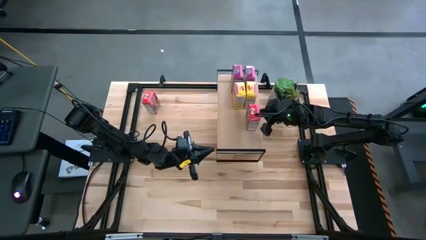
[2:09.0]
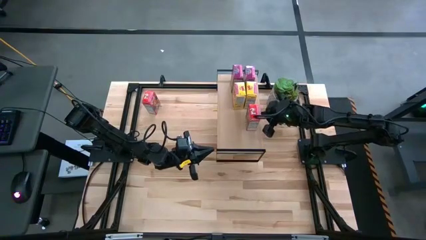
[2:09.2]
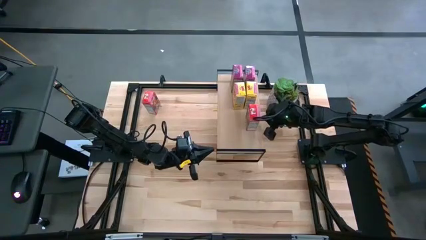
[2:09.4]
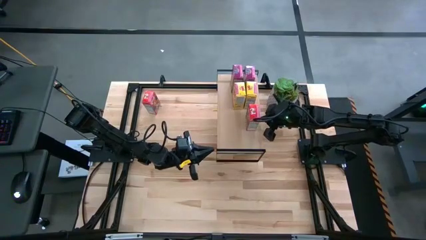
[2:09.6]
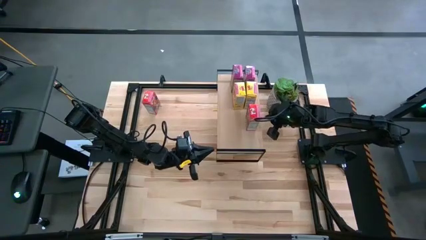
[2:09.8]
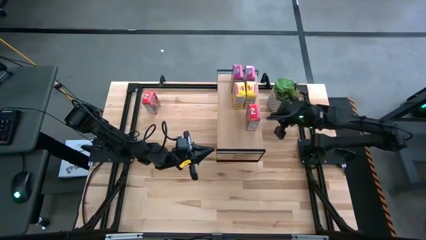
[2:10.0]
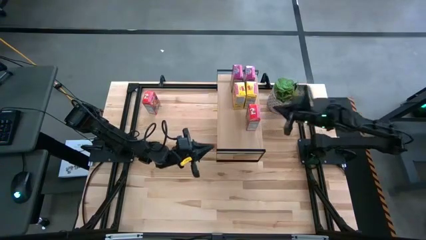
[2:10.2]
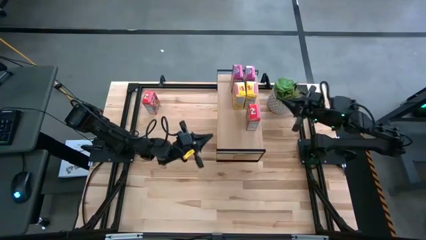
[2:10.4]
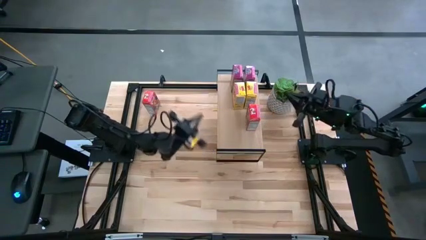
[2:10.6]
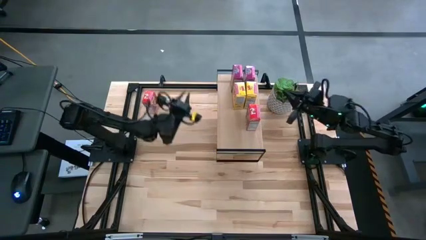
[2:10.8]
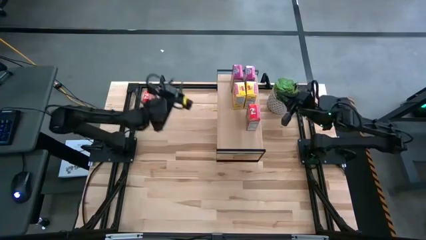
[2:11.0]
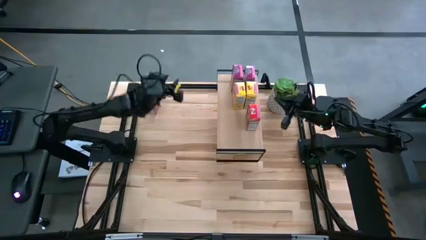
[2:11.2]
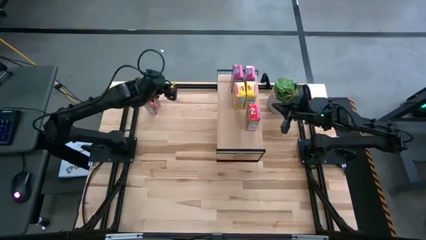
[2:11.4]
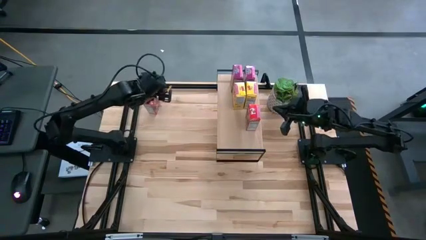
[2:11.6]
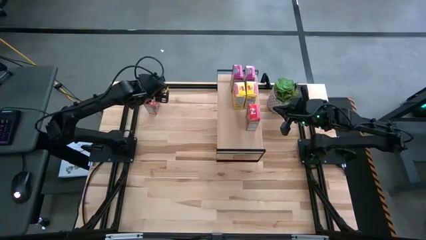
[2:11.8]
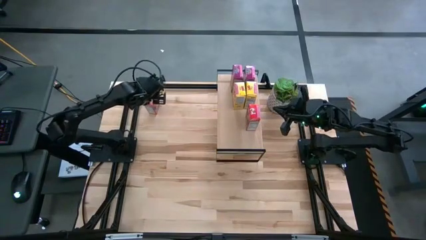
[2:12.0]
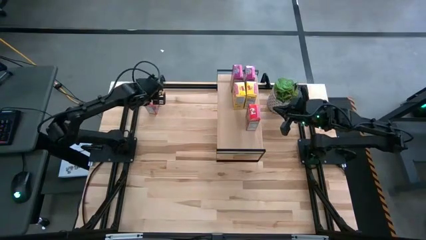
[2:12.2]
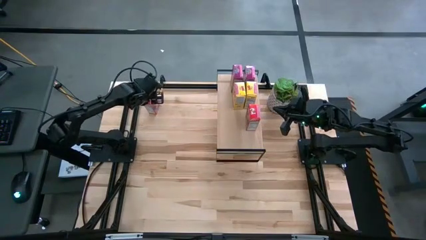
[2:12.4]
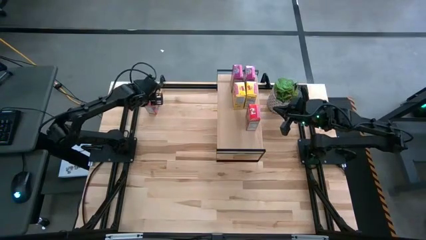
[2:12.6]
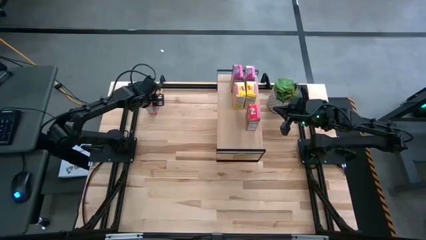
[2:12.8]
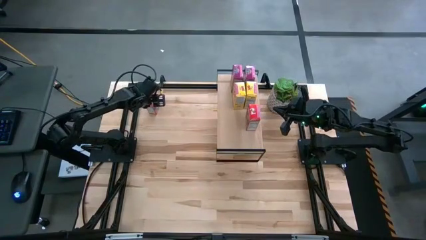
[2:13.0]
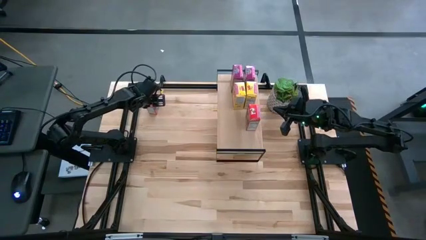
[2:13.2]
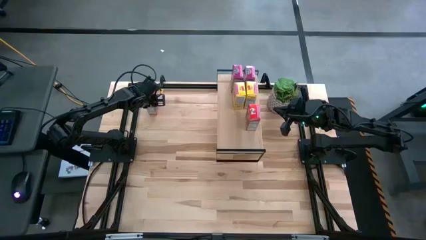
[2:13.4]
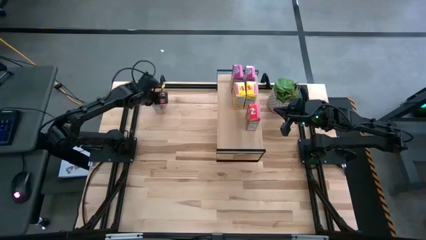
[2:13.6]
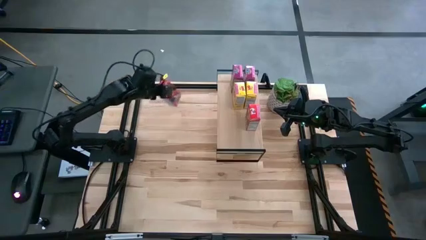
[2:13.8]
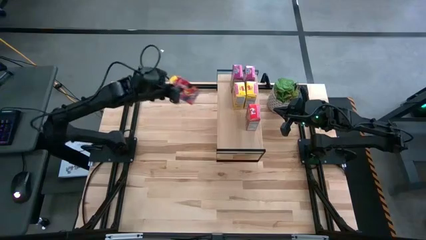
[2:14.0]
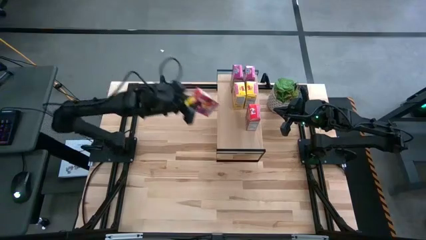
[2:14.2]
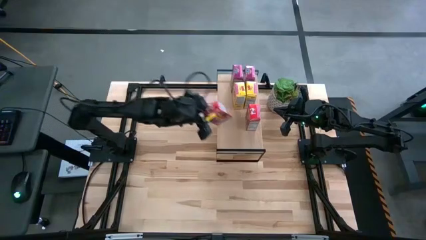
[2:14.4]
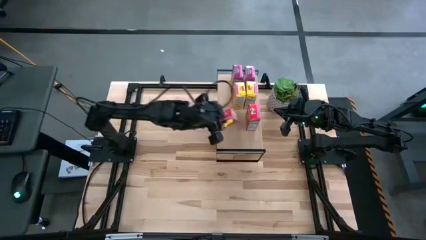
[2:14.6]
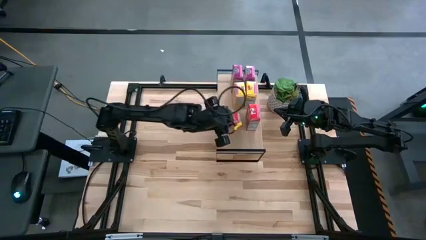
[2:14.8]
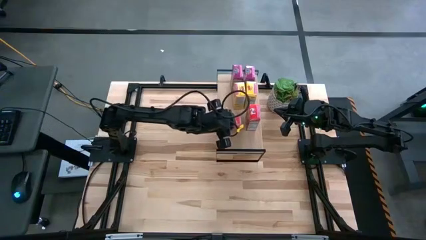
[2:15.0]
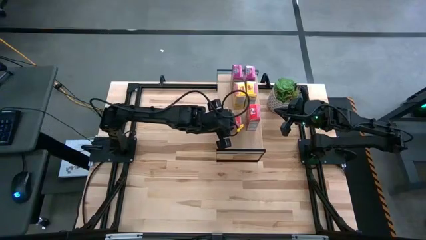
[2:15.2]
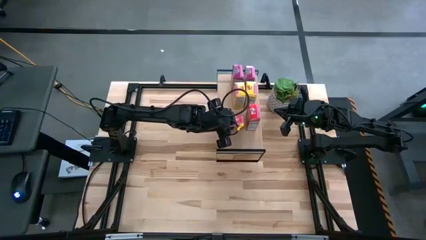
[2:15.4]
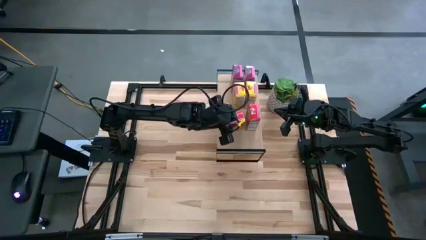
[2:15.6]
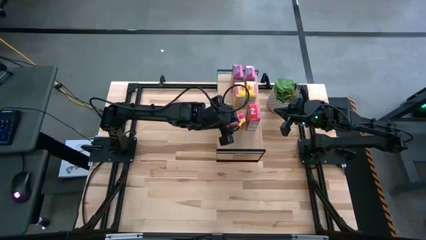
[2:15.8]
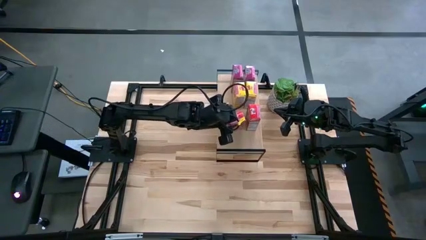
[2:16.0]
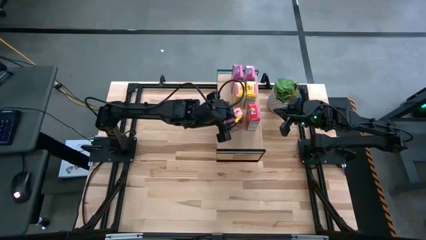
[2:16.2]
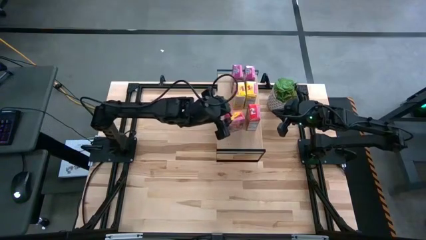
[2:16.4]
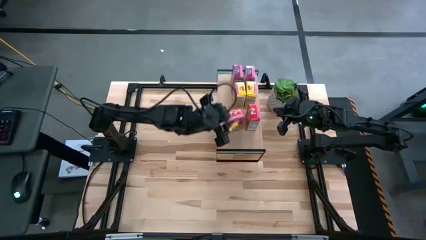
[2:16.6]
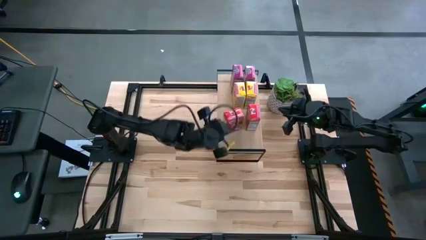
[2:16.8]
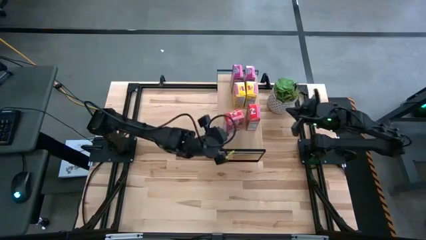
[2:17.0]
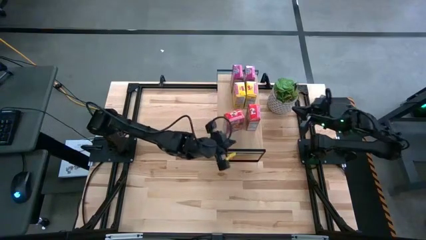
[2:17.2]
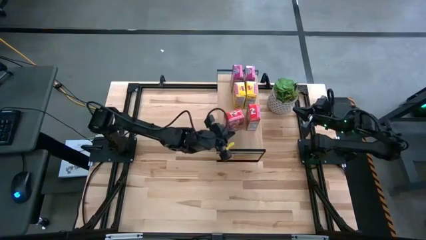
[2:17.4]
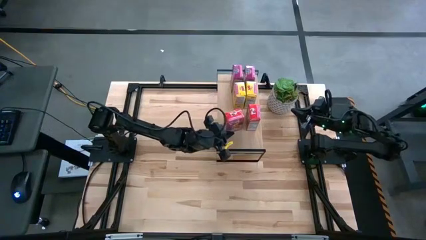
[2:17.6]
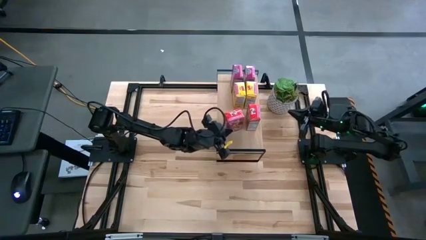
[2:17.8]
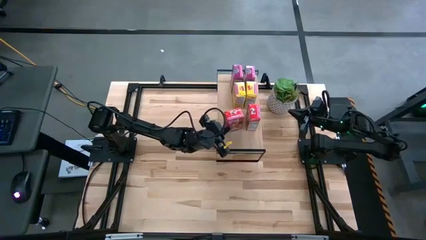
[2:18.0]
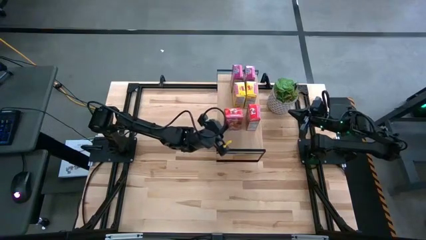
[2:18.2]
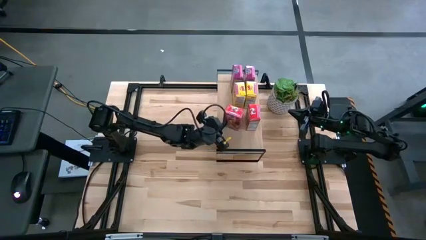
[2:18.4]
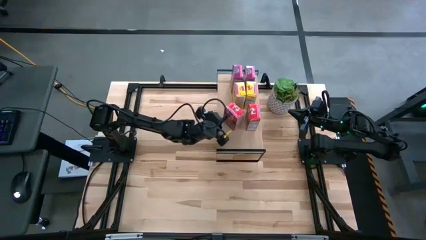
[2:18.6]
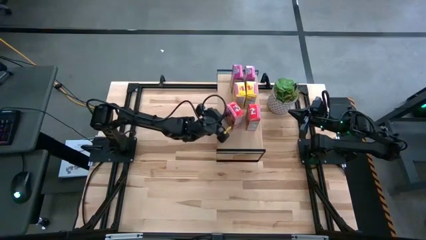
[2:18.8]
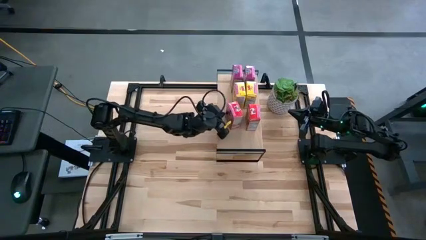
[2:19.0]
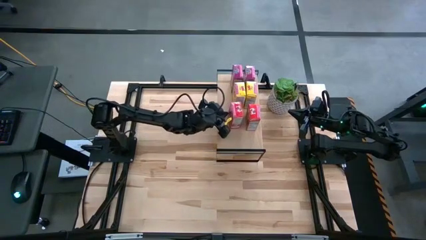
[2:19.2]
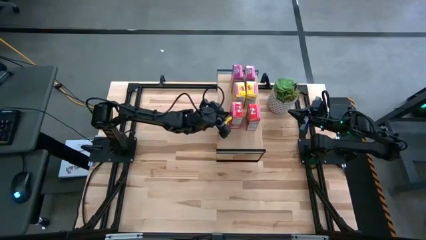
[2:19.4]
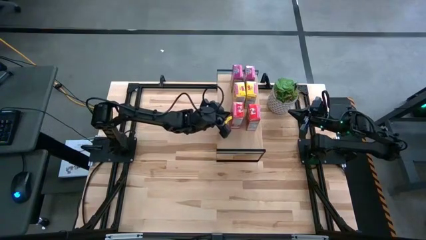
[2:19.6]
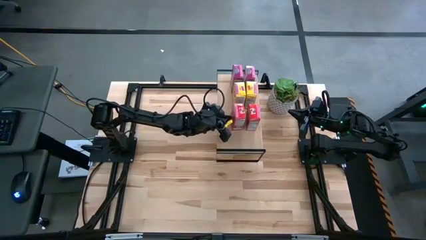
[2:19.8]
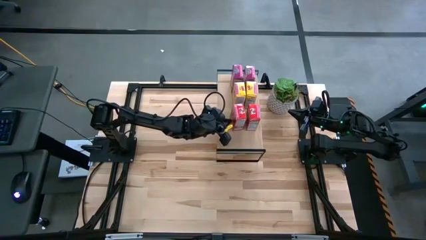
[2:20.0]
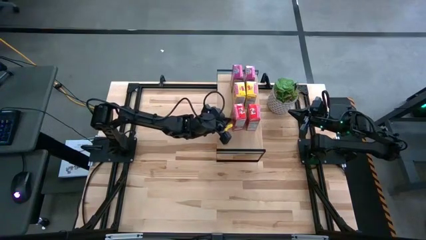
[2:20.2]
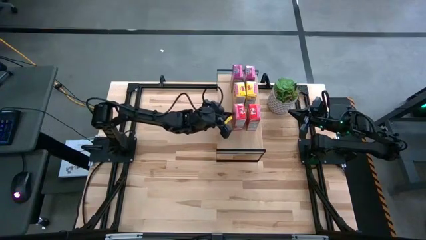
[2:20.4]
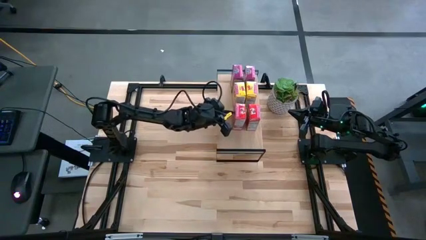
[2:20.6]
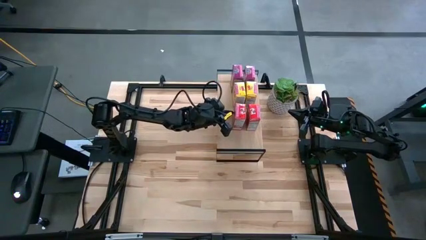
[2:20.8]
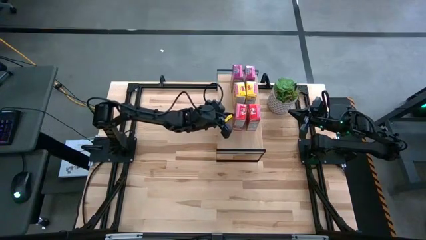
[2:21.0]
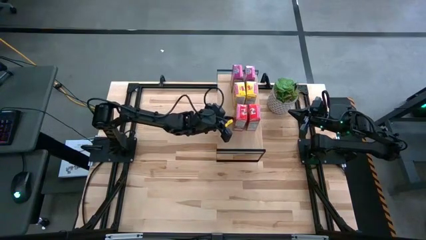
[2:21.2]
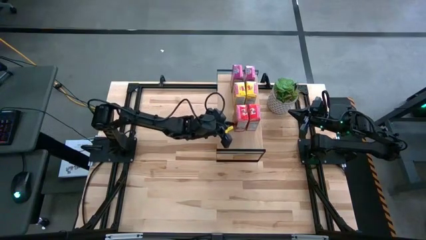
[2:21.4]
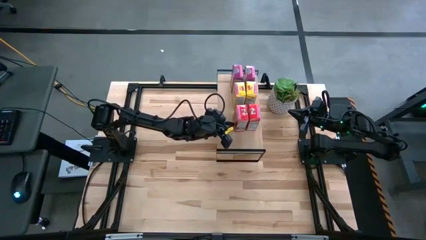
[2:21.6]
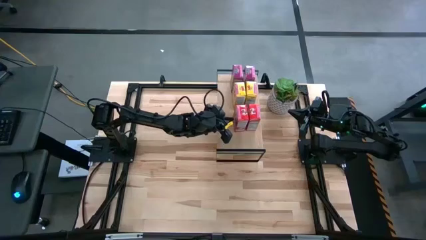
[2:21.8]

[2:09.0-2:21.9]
Task: Stack cereal on shelf
Put the red cereal box on the shelf aligned with the red cereal box
